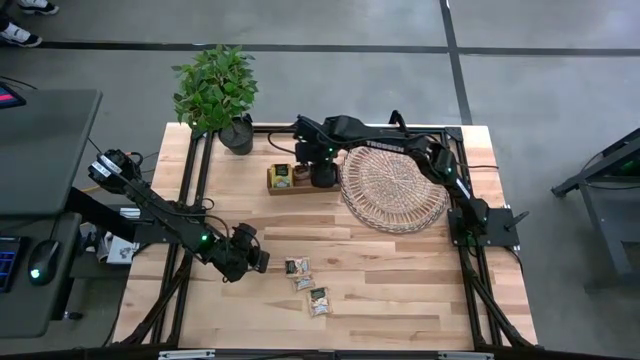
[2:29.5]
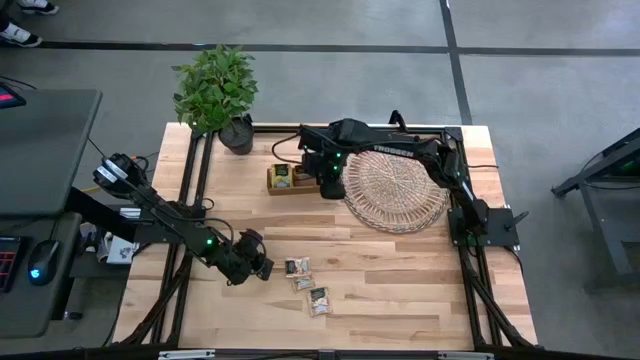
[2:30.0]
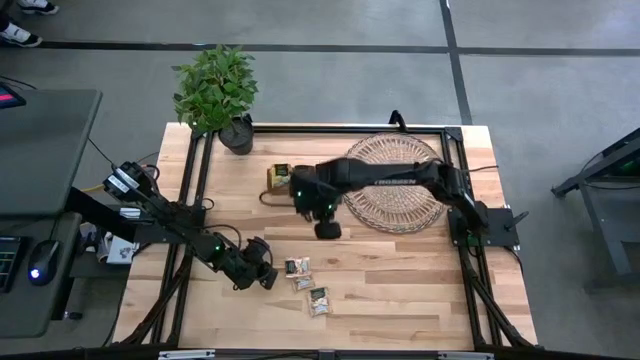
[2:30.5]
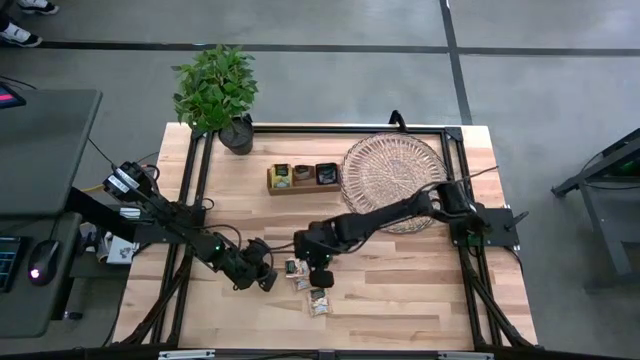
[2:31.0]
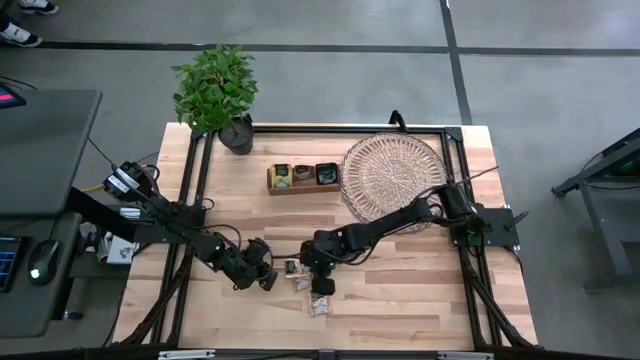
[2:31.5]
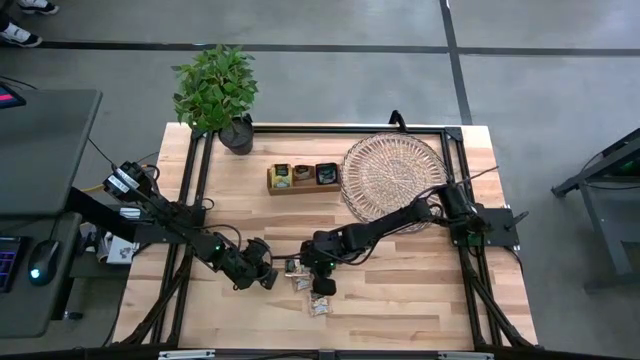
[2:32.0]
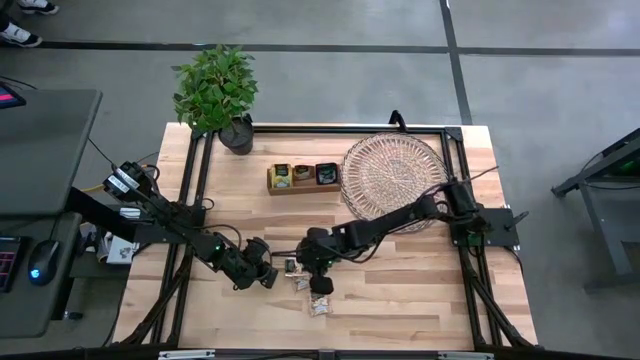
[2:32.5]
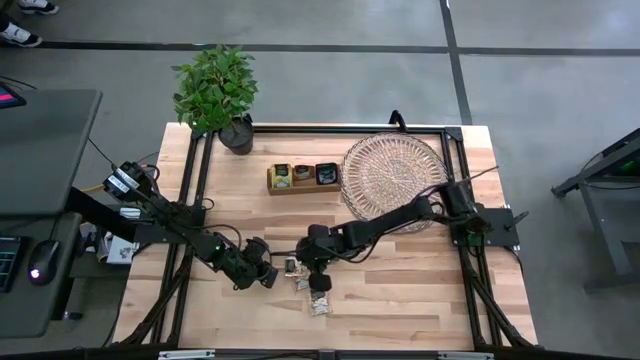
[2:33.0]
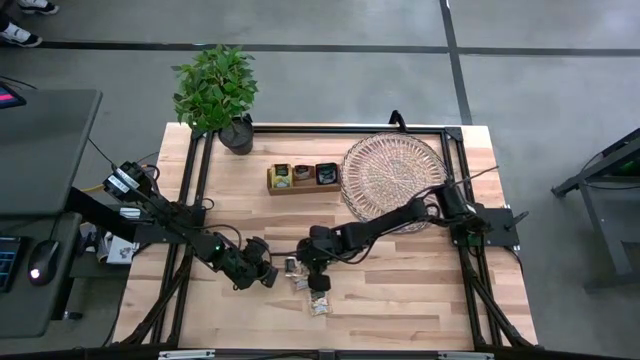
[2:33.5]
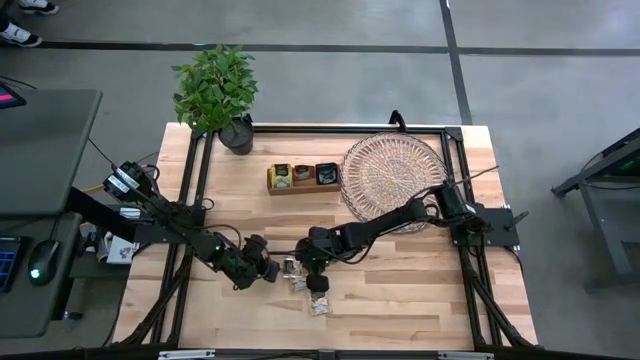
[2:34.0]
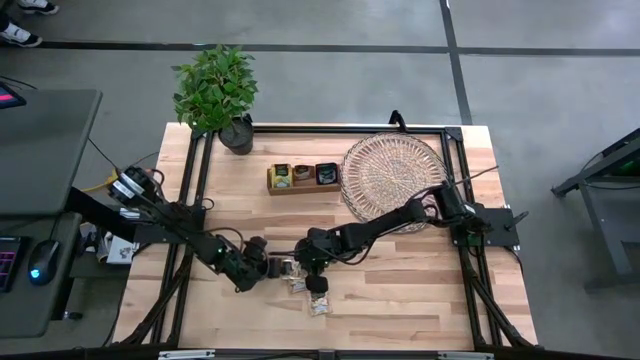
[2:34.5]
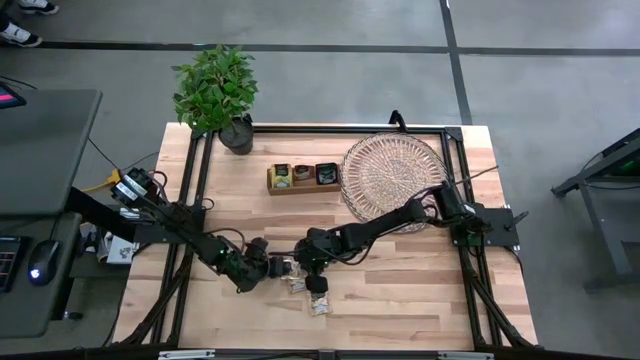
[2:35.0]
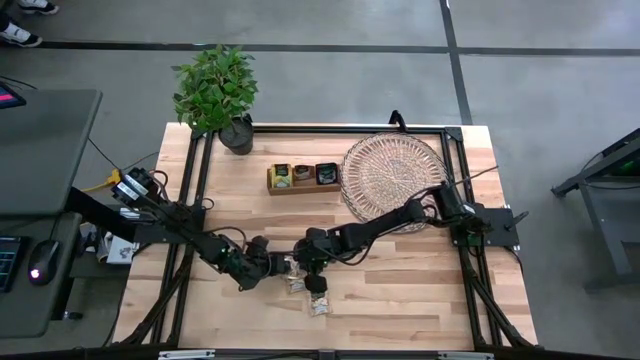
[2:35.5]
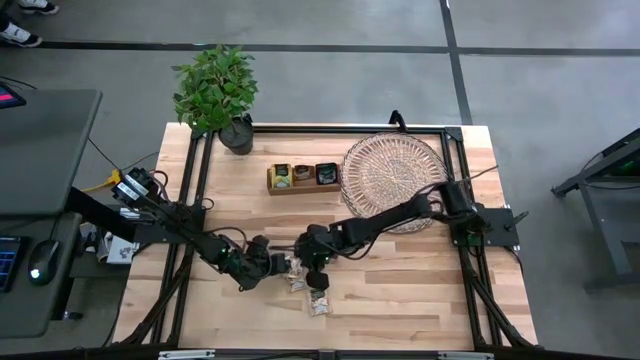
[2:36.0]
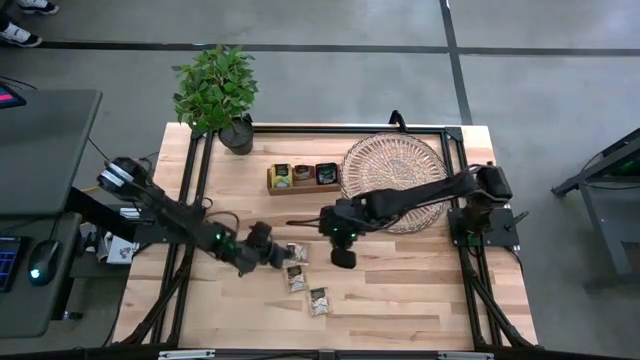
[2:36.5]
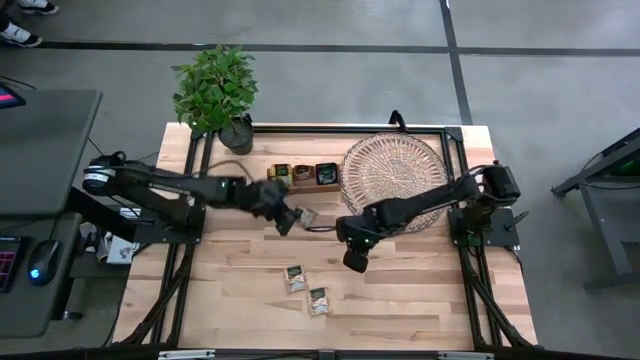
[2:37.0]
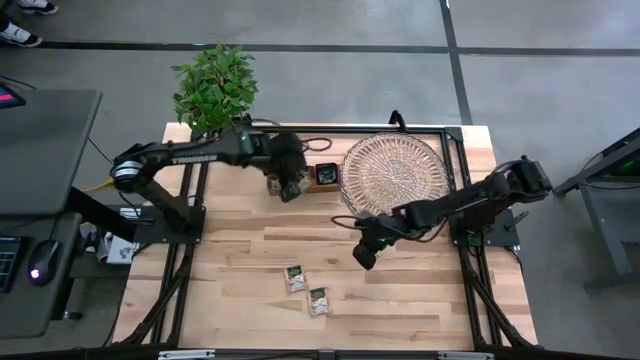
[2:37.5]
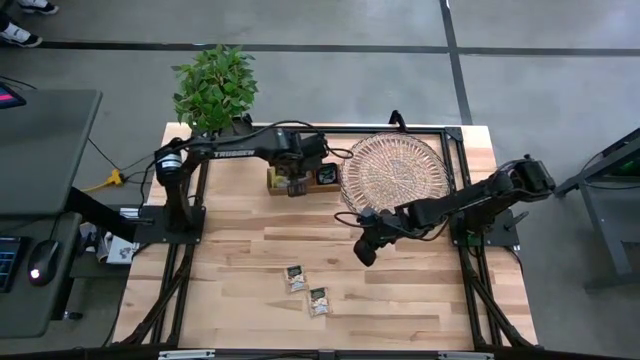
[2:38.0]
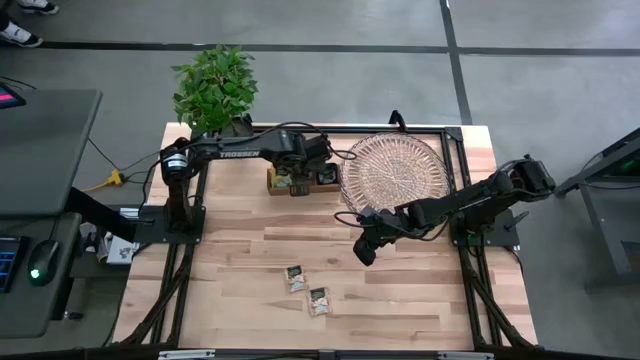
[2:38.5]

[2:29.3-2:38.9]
Task: Pick & Place Tea
Put the brown tea bag into the middle section of the wooden organizer

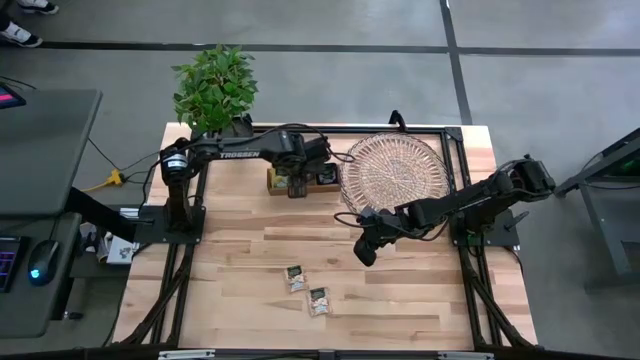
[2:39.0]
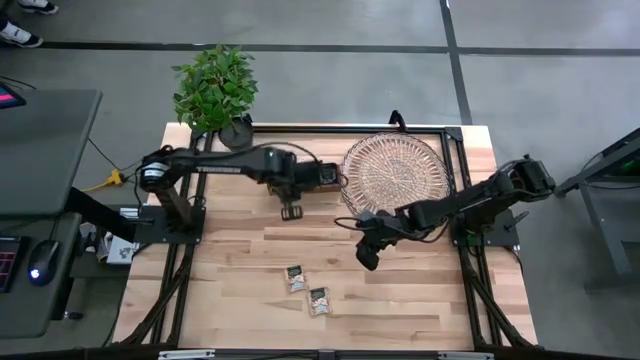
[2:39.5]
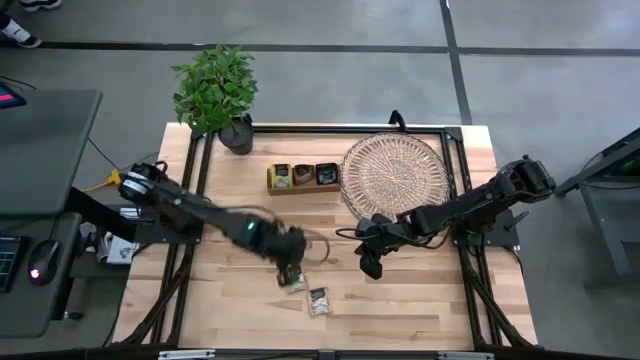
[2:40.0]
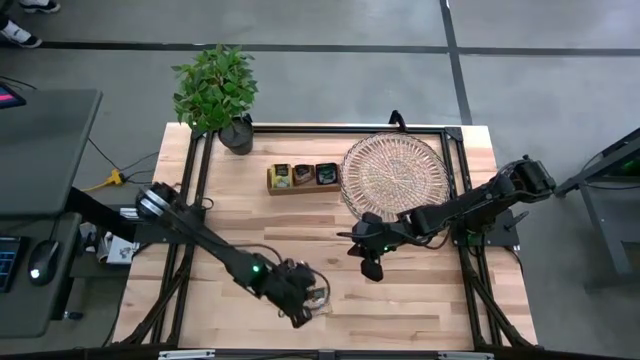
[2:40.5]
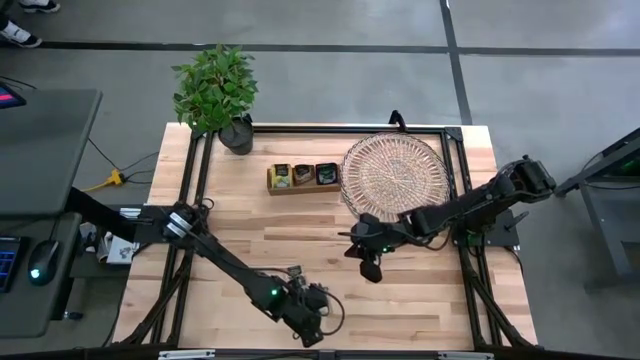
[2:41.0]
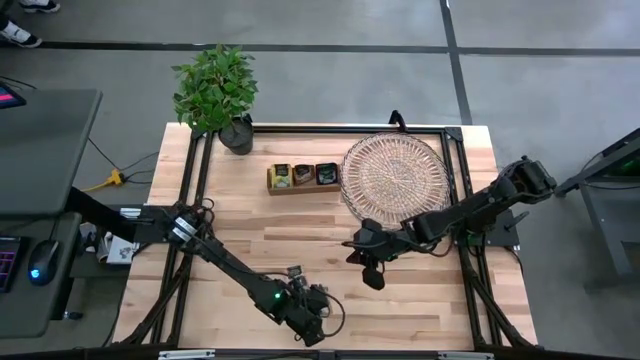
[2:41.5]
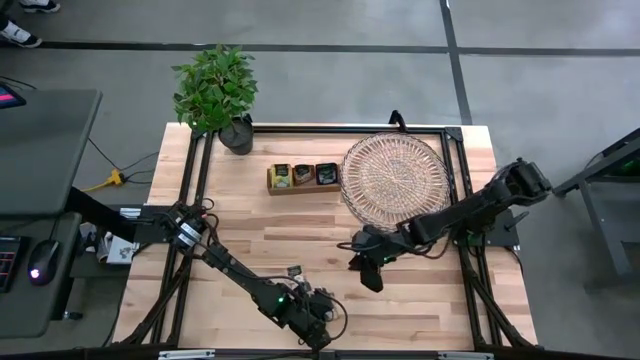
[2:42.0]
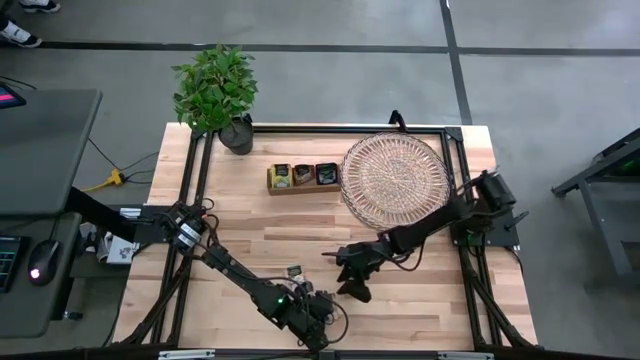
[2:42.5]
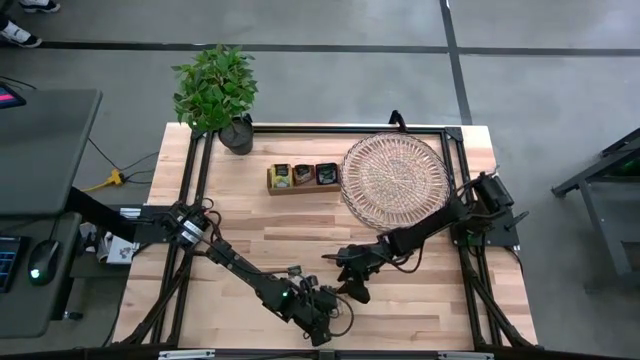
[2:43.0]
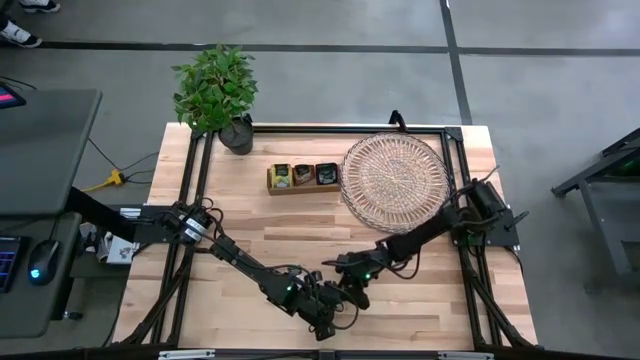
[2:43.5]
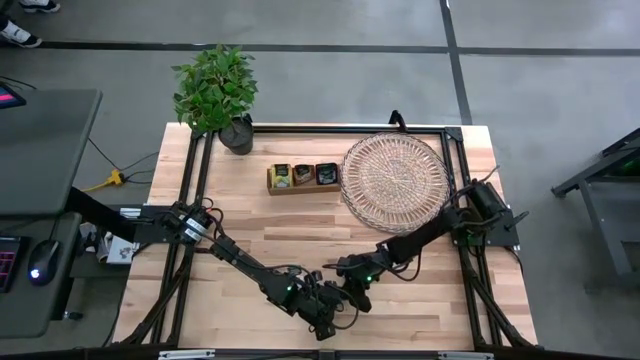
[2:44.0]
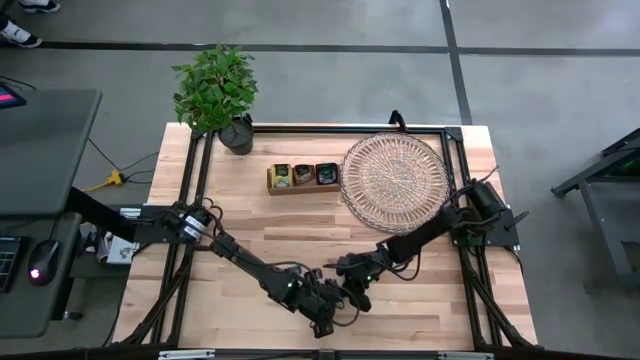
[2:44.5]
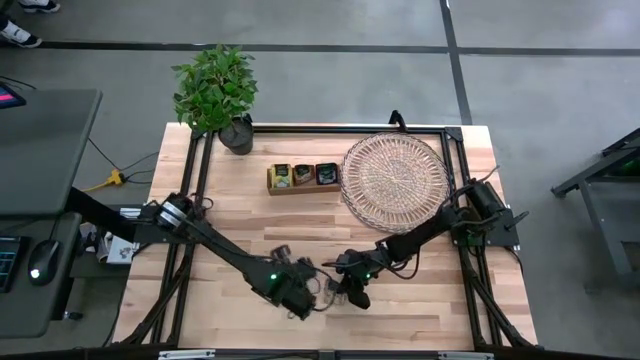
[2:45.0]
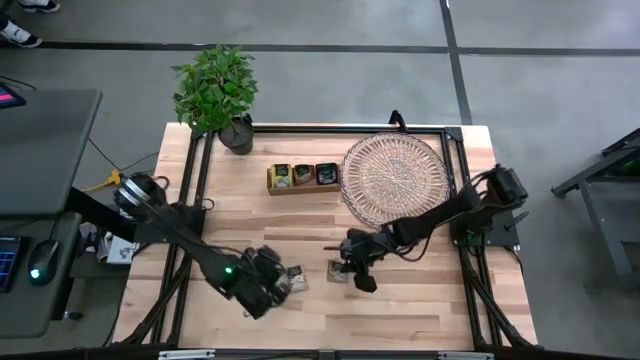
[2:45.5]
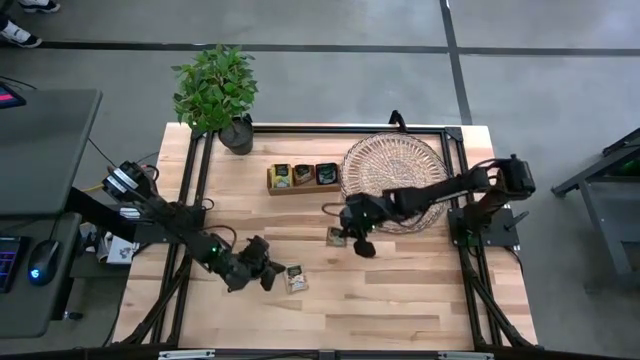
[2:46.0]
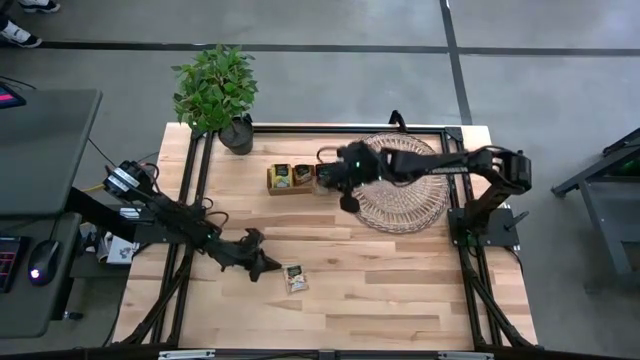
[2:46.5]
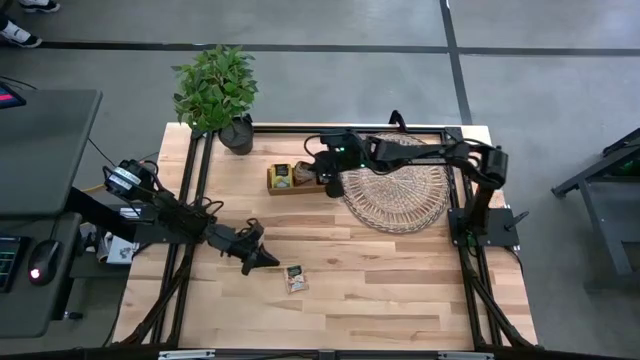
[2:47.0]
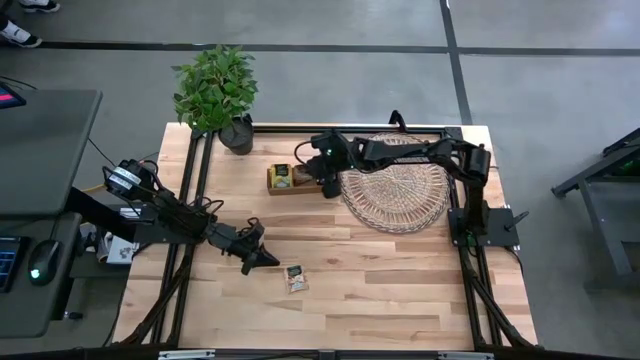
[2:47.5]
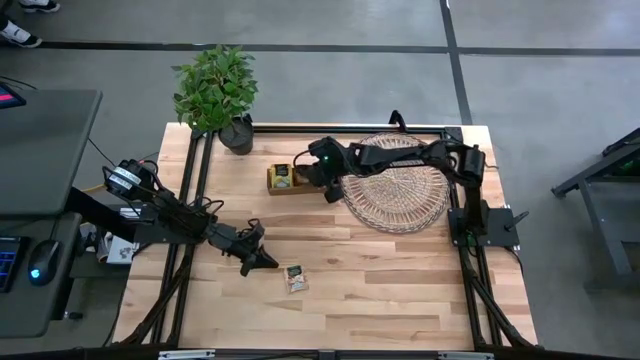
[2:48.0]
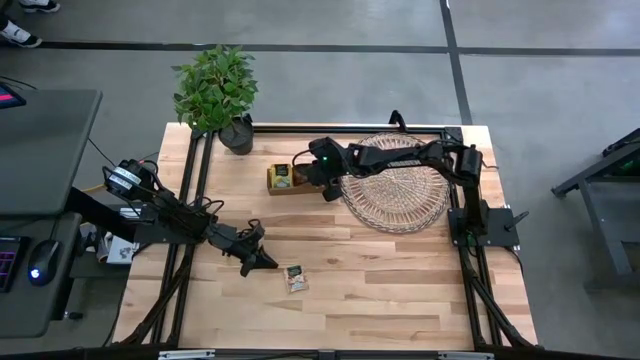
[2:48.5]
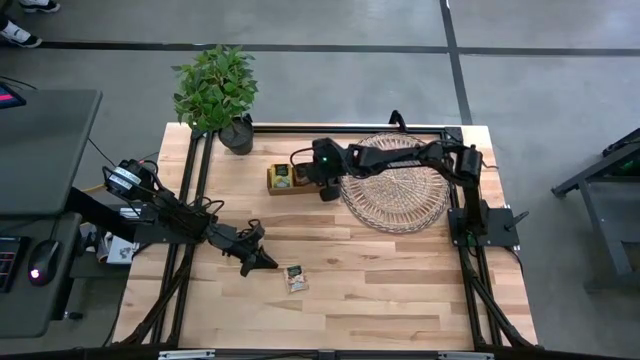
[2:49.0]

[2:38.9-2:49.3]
Put the brown tea bag into the middle section of the wooden organizer
